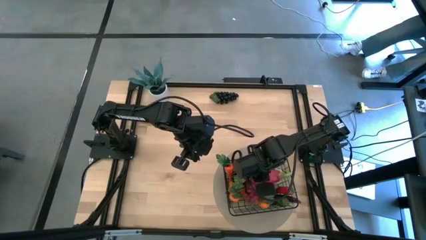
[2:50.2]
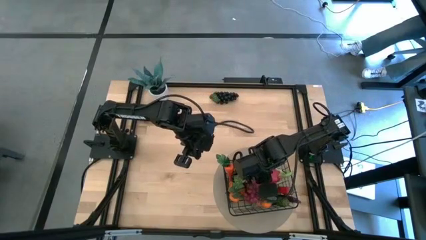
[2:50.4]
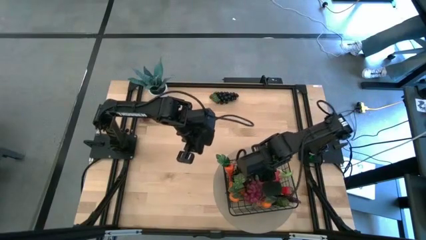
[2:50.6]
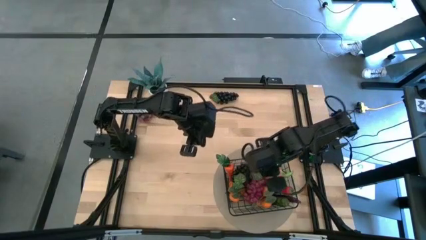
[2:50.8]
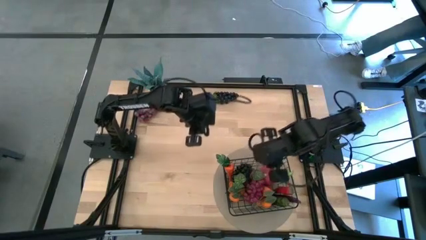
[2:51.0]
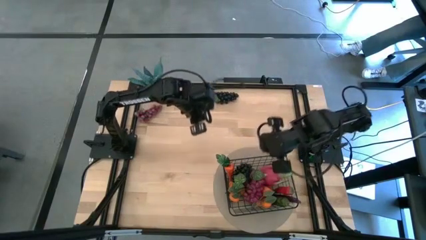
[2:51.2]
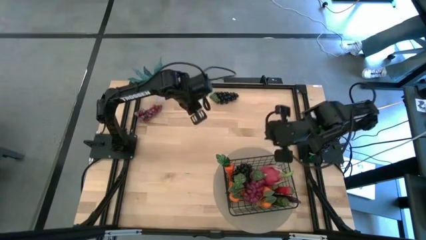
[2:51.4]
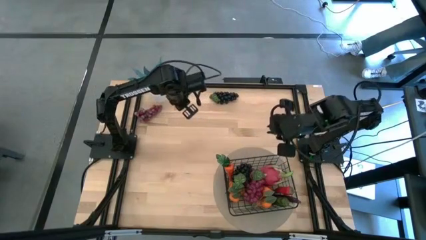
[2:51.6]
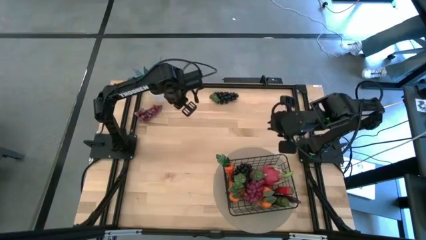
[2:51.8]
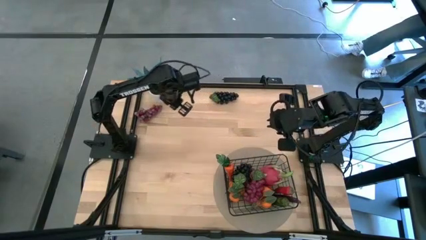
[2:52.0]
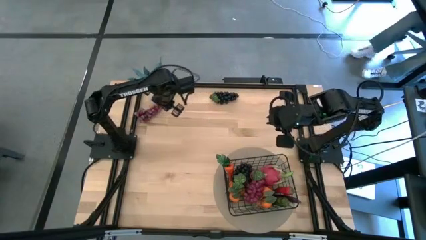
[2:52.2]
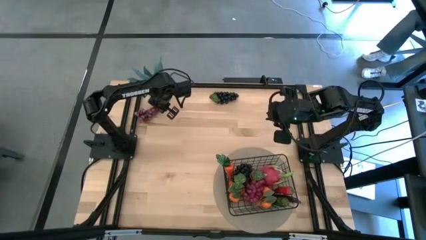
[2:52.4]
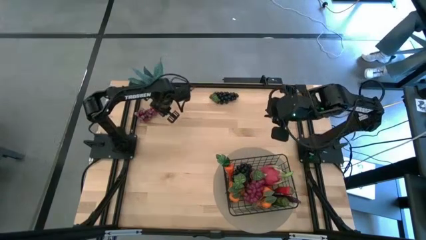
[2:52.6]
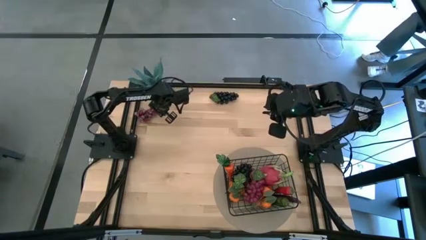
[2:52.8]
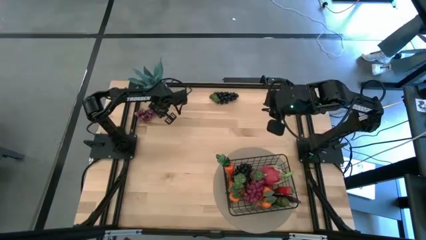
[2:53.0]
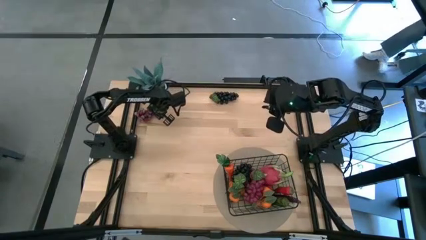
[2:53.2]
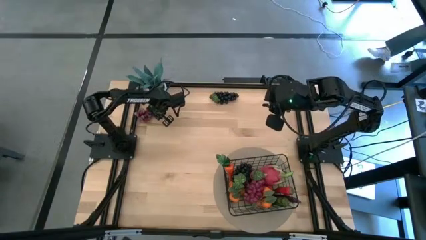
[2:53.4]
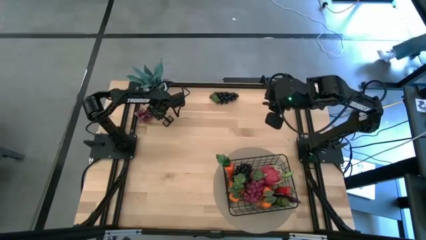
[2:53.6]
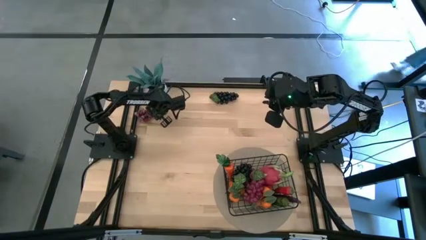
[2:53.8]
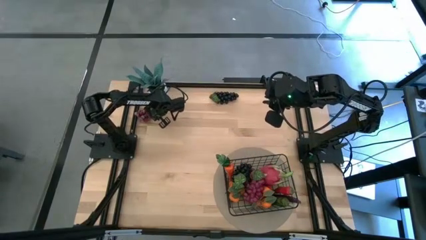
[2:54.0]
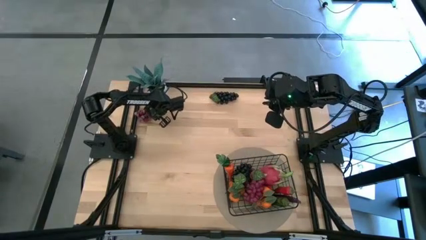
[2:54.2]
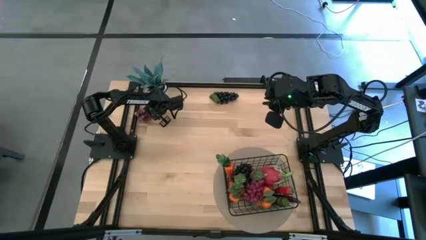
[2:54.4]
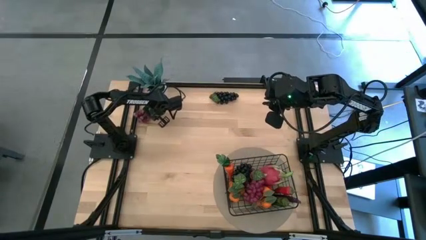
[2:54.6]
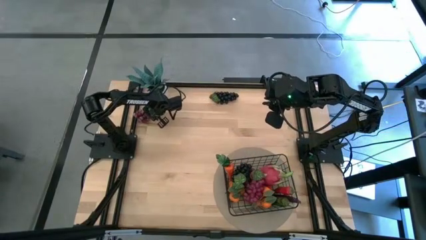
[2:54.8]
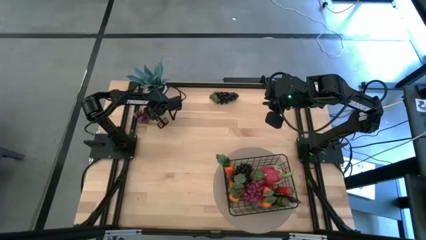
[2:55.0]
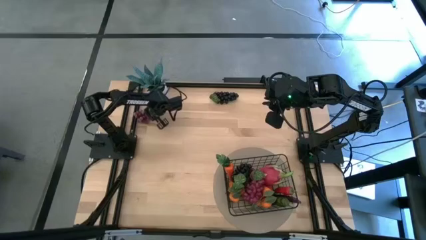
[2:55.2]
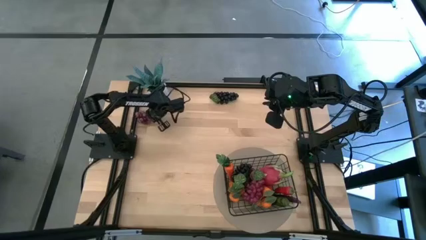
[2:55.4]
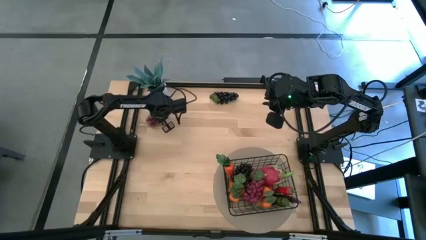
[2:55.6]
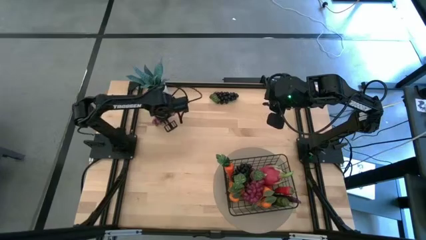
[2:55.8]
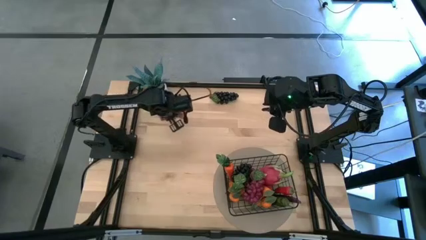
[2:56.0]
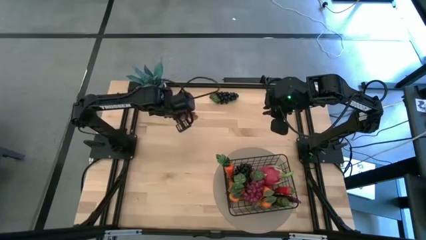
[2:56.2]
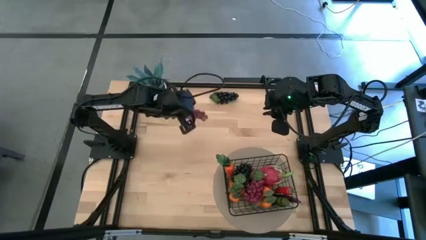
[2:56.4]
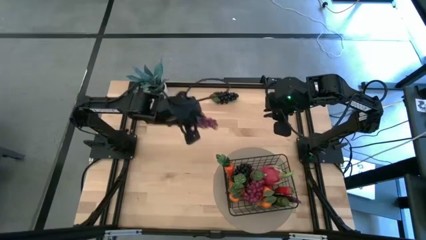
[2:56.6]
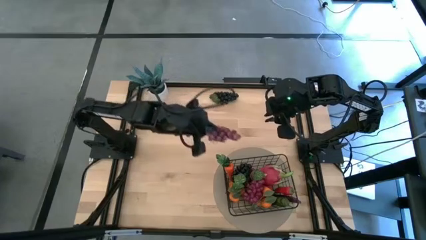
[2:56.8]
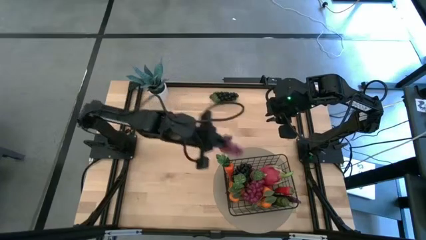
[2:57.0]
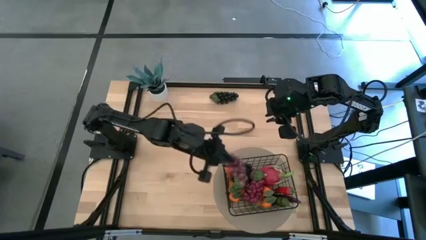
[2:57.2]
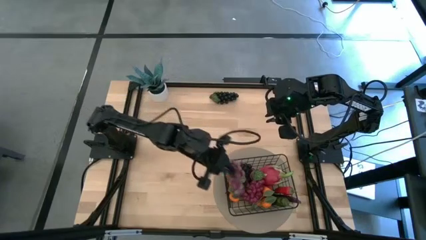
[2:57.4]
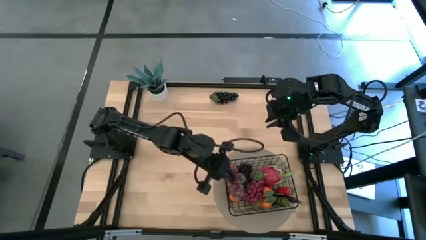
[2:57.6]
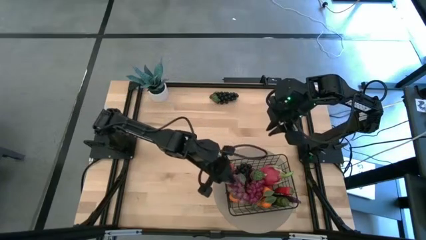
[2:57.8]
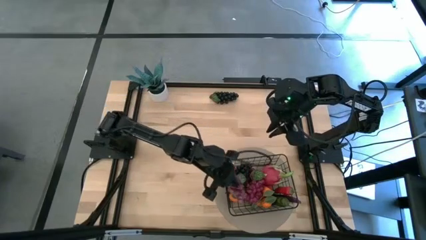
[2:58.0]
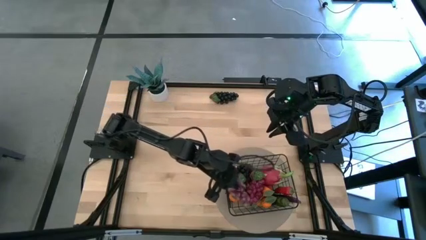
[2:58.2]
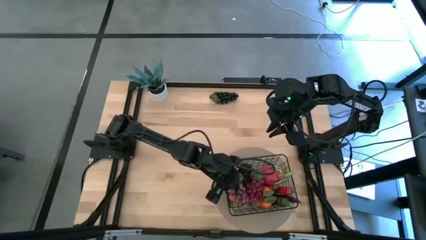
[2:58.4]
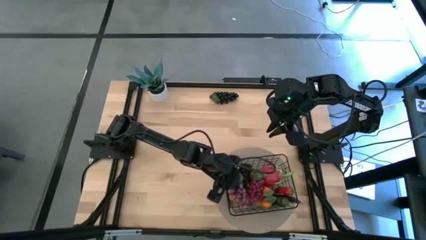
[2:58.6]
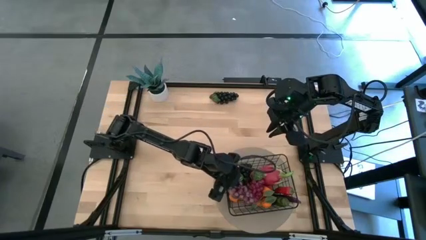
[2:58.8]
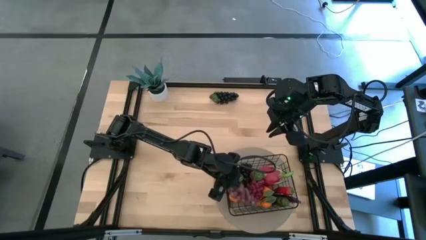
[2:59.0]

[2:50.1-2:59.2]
Task: Build produce basket
Put the top left grapes into the wire basket

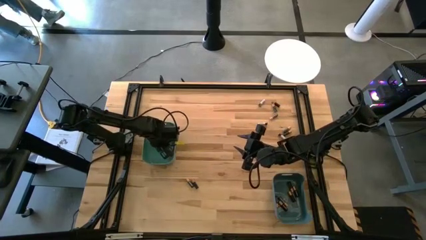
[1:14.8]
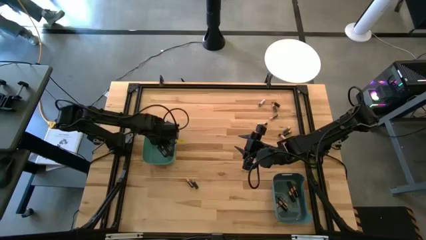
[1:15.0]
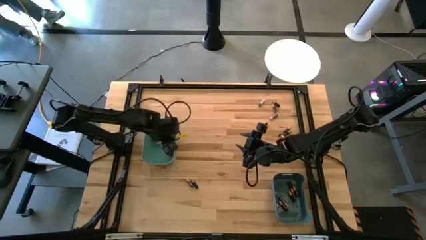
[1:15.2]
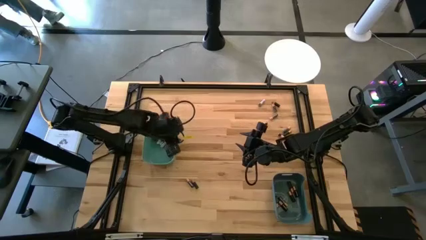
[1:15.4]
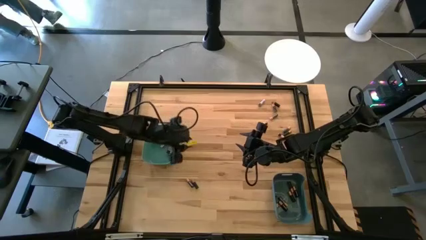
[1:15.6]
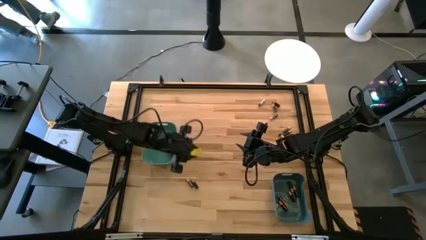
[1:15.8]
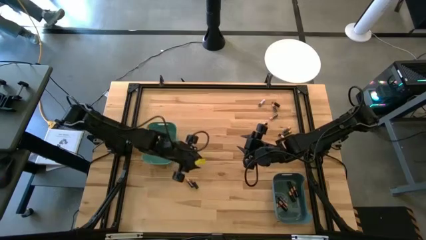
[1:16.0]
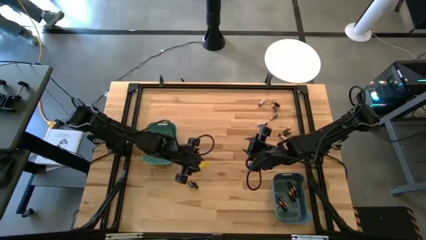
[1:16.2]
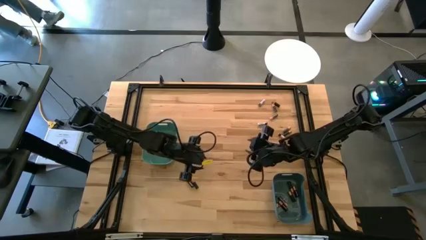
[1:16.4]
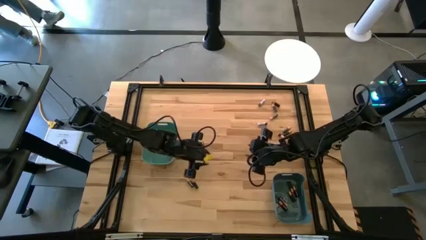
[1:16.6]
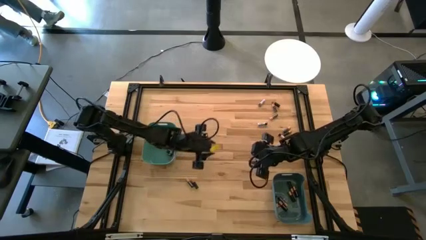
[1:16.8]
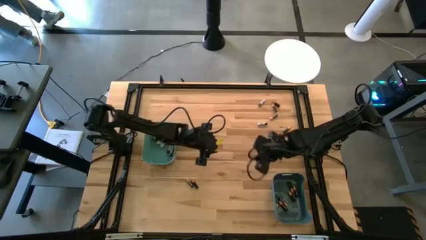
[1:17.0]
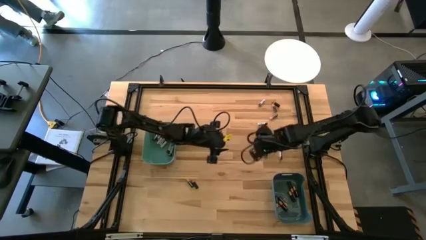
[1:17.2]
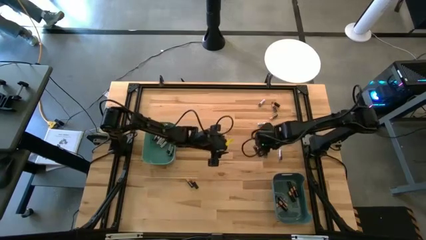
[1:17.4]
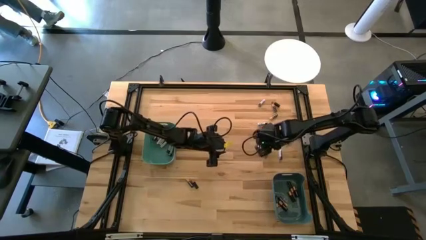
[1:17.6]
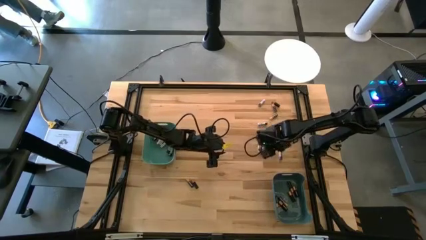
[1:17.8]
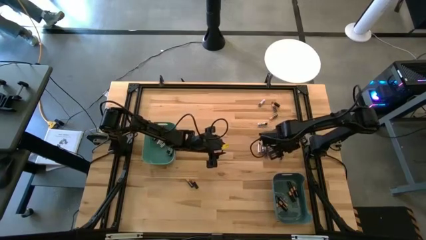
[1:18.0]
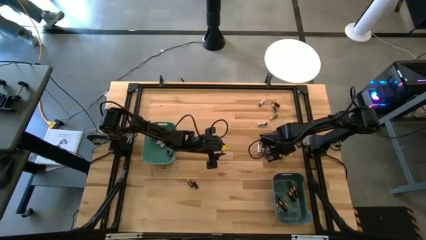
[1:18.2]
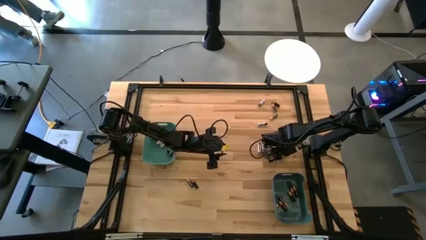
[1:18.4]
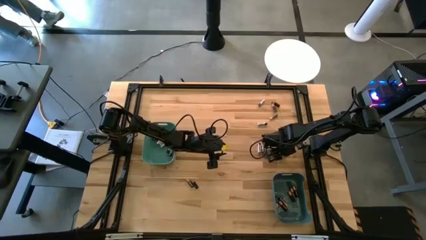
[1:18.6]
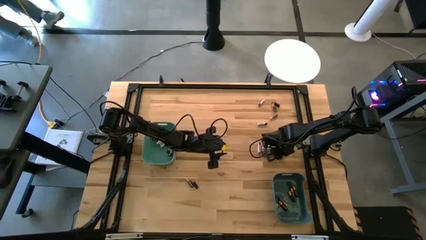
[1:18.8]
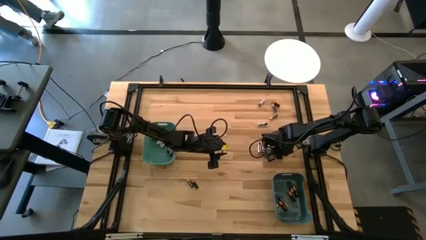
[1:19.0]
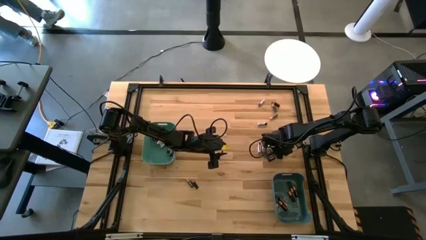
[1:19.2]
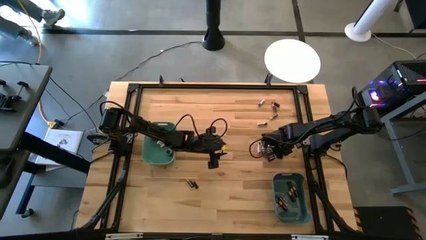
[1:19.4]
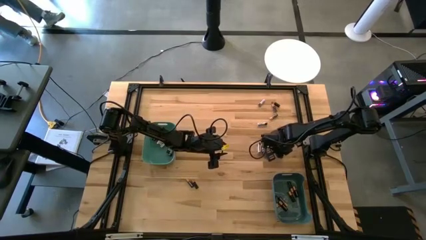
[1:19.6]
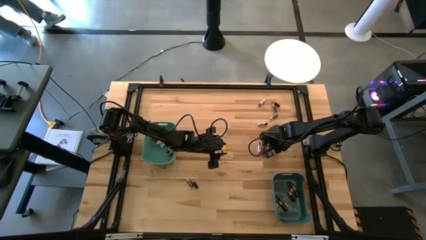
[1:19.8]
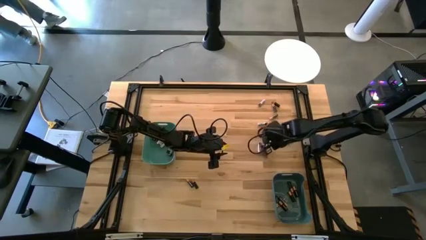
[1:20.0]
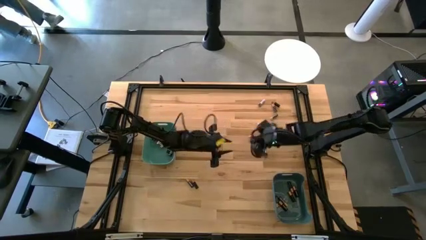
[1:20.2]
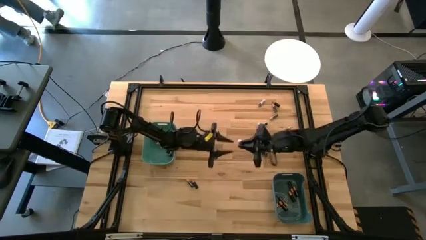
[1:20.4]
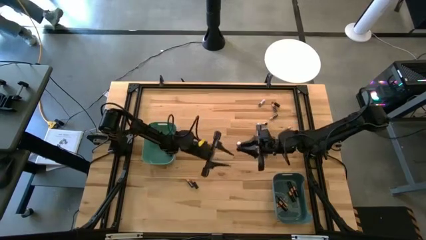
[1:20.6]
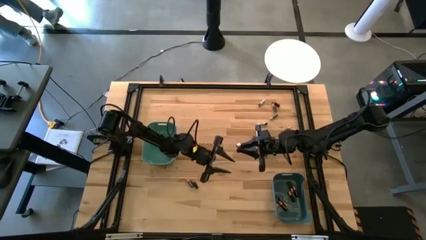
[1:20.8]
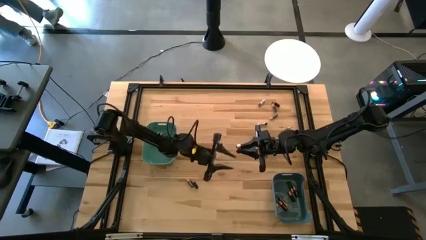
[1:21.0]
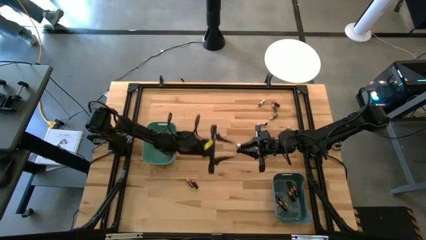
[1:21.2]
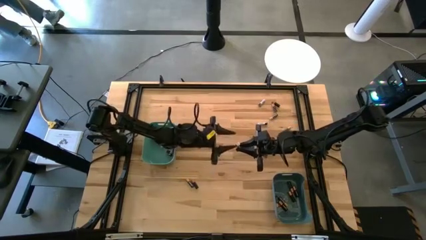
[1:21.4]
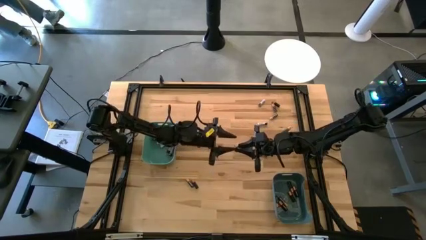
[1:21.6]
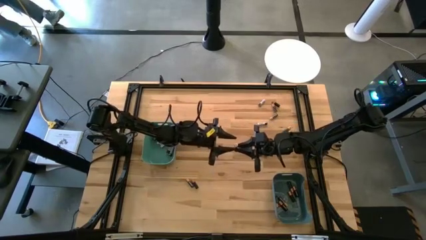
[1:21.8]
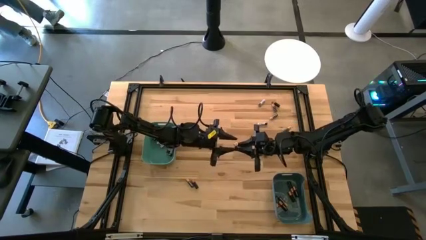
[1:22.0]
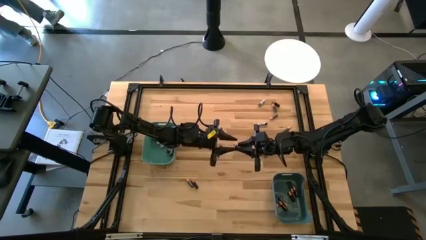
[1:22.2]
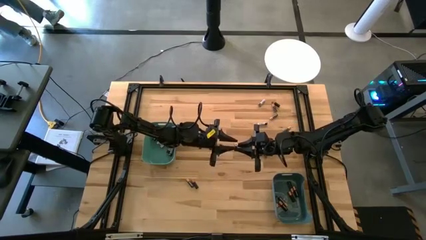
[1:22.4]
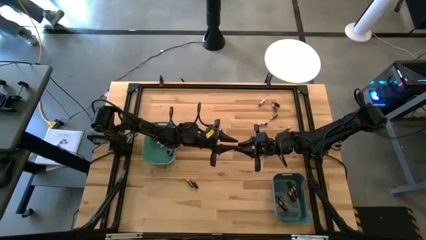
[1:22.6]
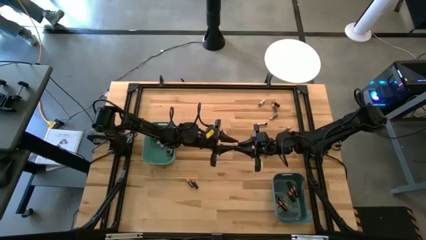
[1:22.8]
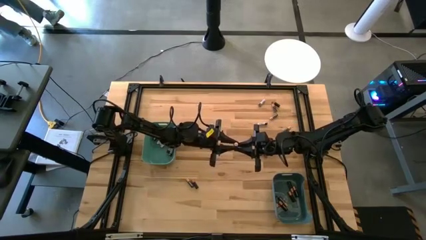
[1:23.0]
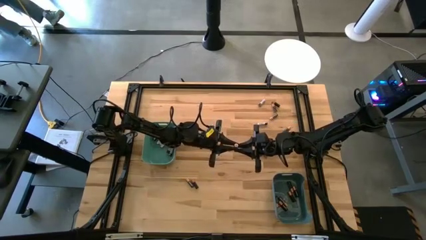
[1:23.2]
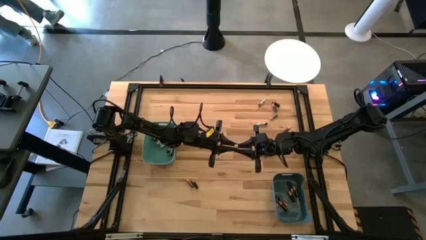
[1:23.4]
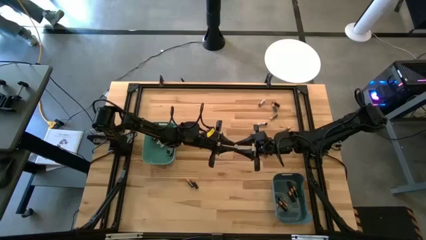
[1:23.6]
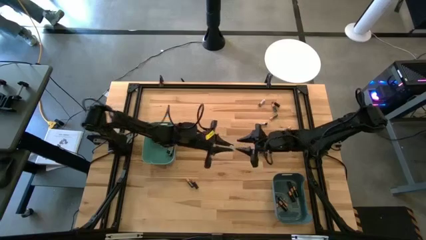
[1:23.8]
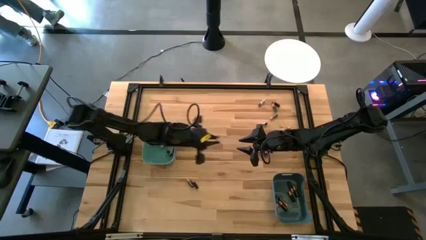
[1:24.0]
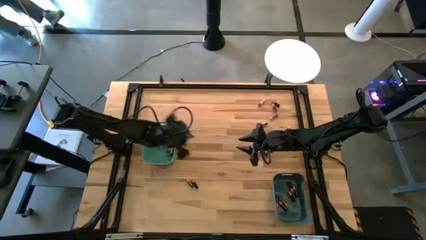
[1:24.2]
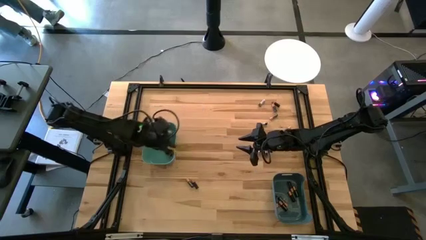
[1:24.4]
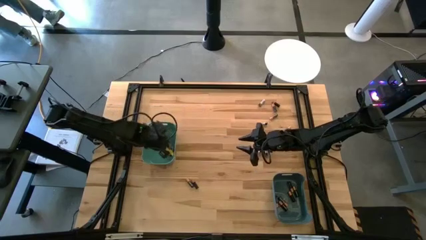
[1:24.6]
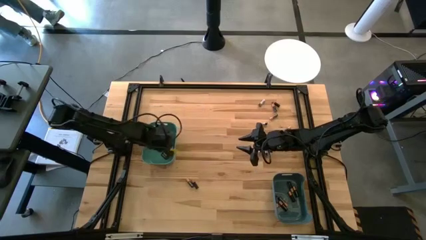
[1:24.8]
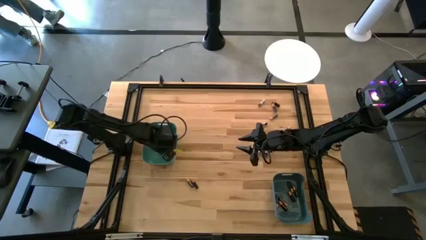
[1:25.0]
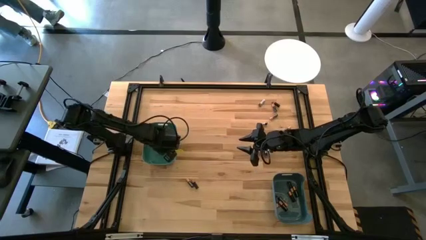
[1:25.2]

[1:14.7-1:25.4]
Task: Sort batteries
Put the silver battery into the green bin
